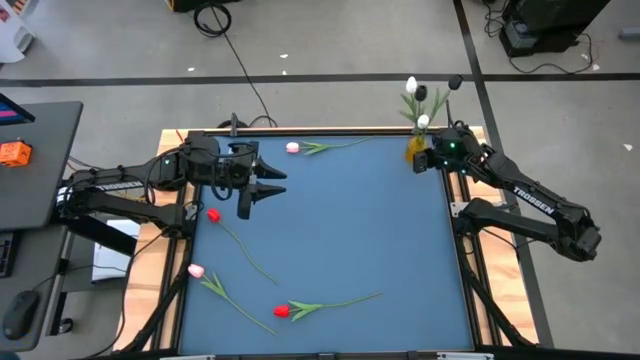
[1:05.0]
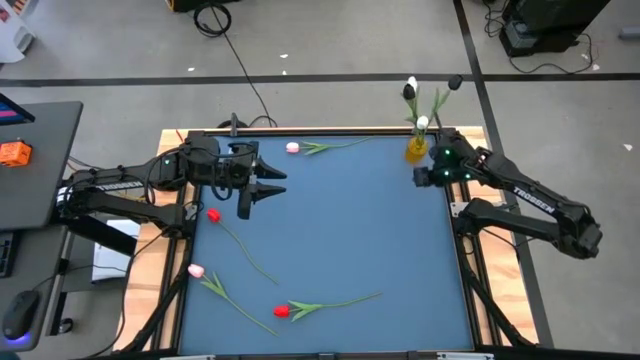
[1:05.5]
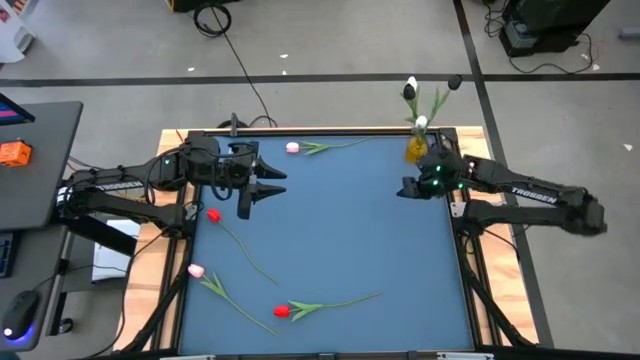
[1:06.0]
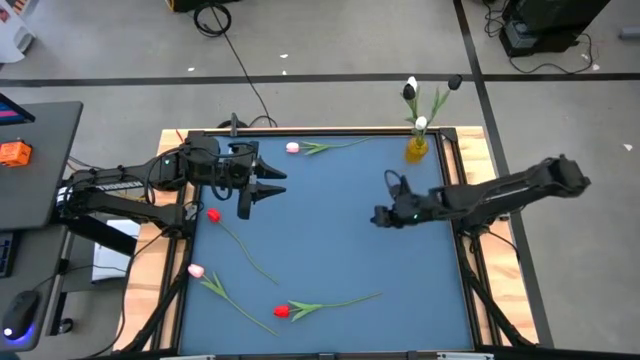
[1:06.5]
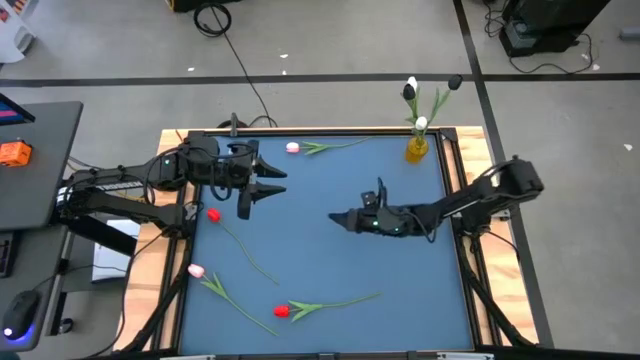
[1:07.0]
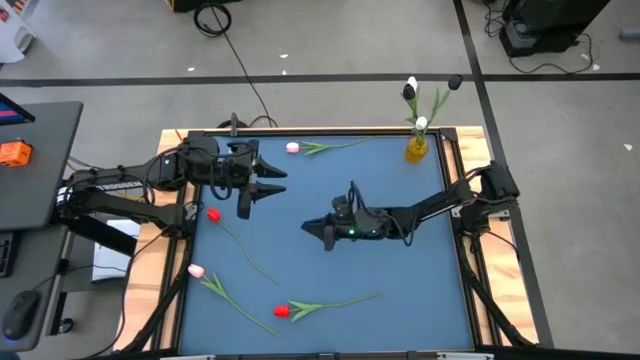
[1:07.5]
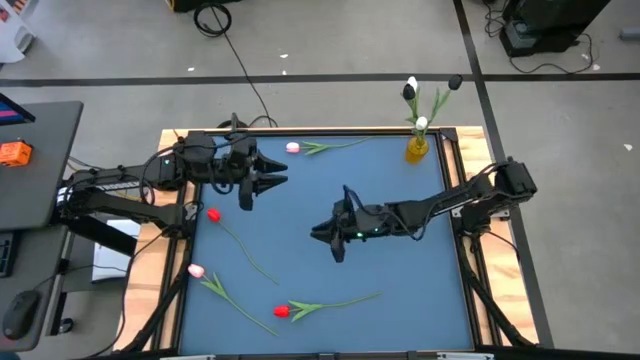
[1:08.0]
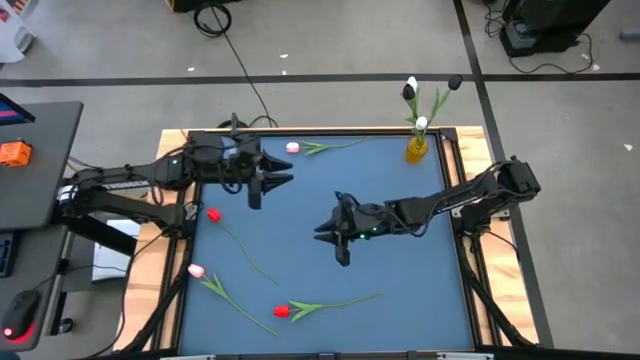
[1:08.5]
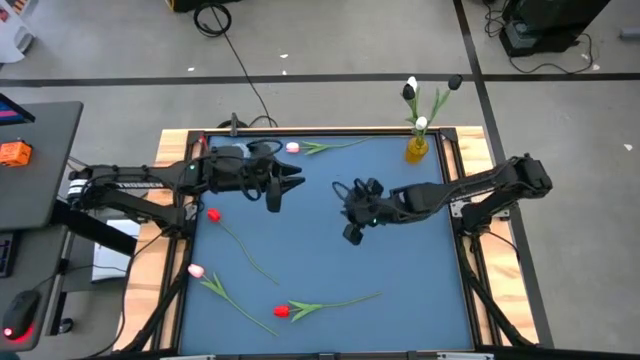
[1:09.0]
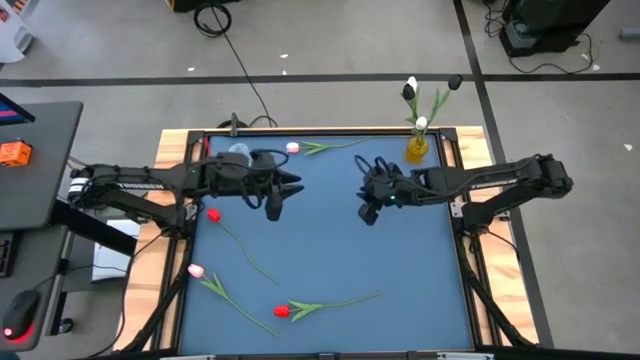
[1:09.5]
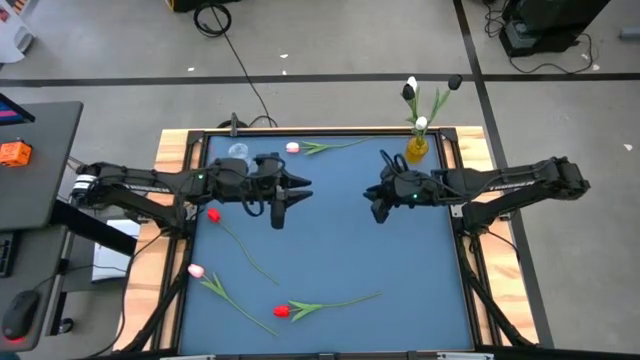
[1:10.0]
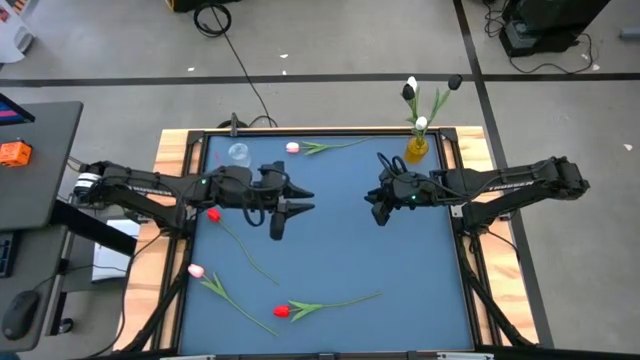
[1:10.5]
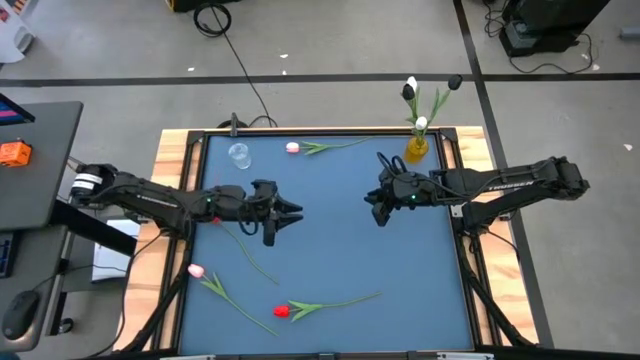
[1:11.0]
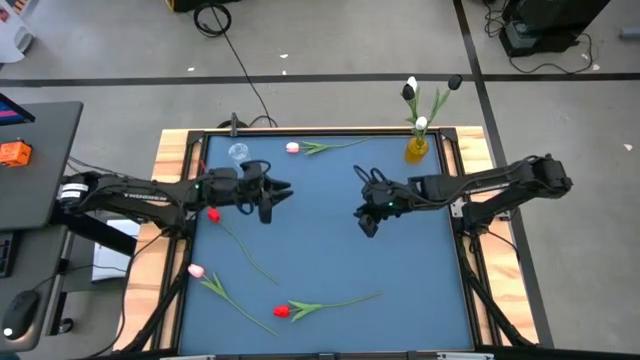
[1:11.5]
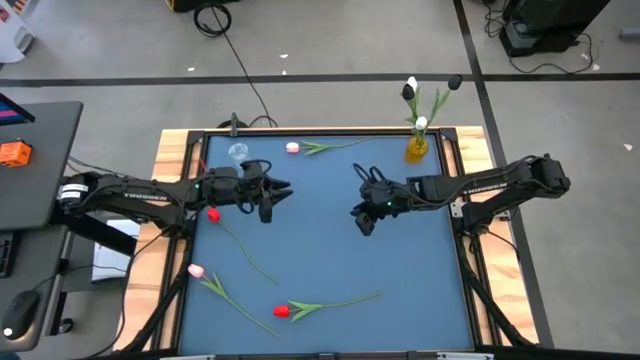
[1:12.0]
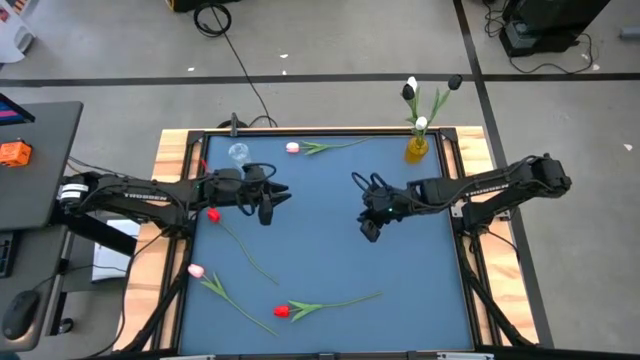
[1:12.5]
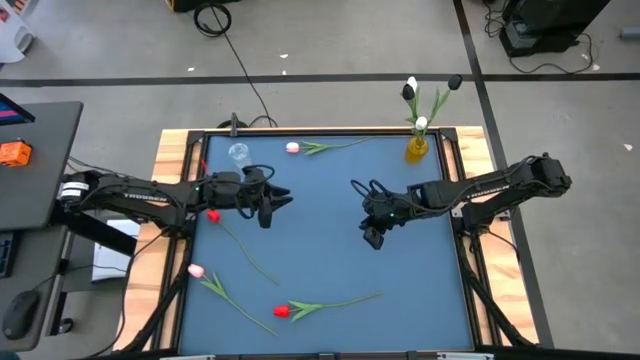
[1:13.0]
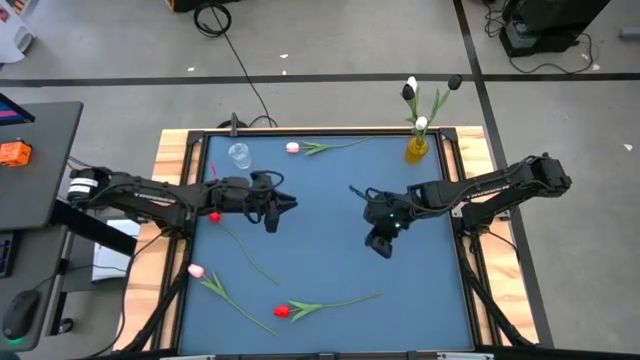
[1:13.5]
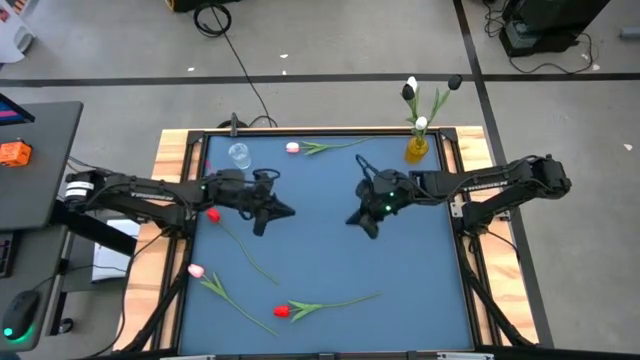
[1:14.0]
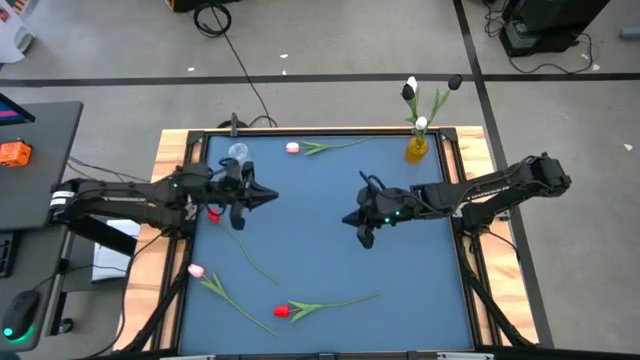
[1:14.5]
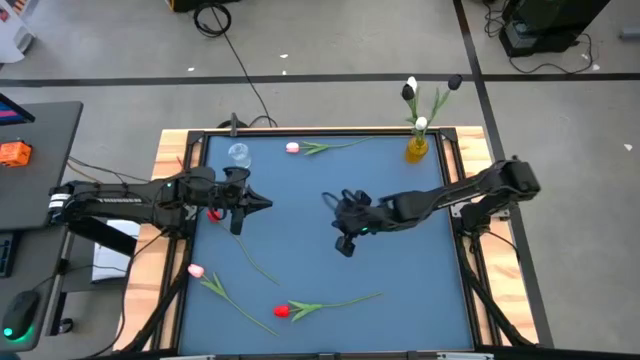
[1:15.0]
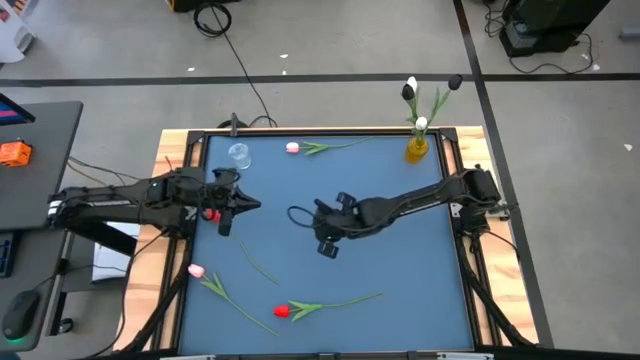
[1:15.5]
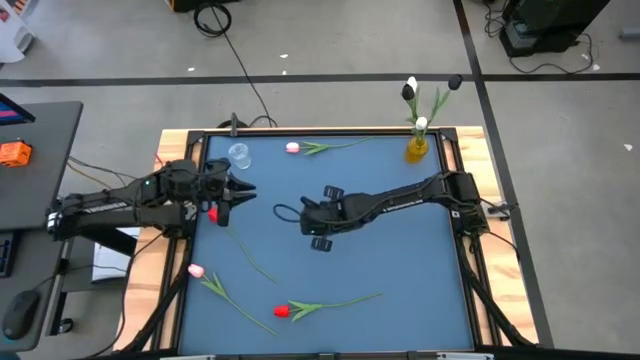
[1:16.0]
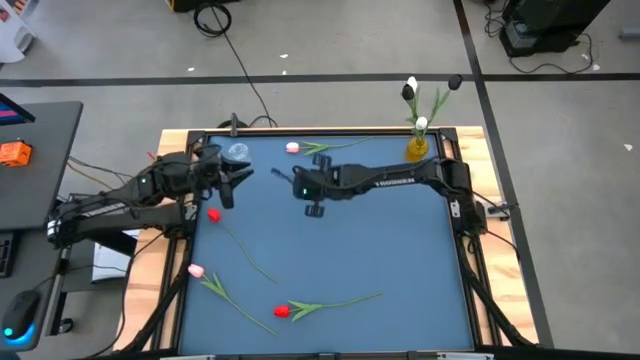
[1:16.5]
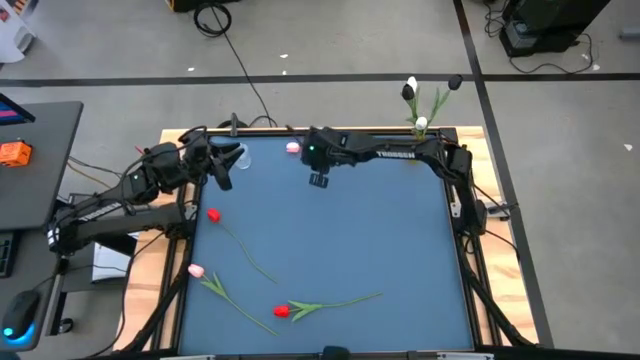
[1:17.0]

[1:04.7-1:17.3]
Task: Sort flowers into vase by color
Put the top pink tulip into the transparent vase

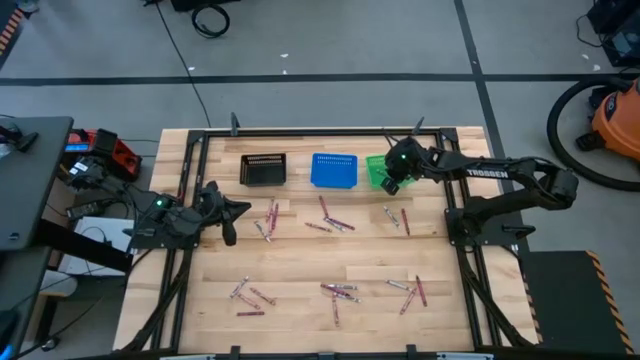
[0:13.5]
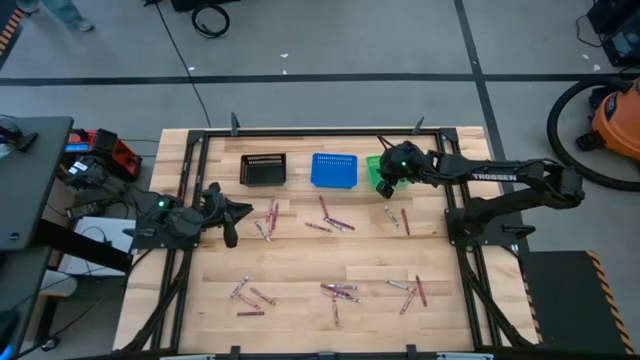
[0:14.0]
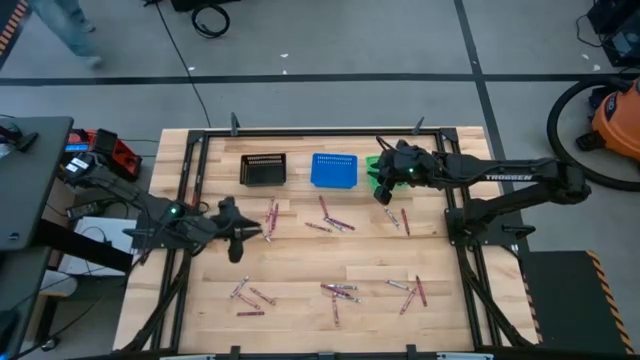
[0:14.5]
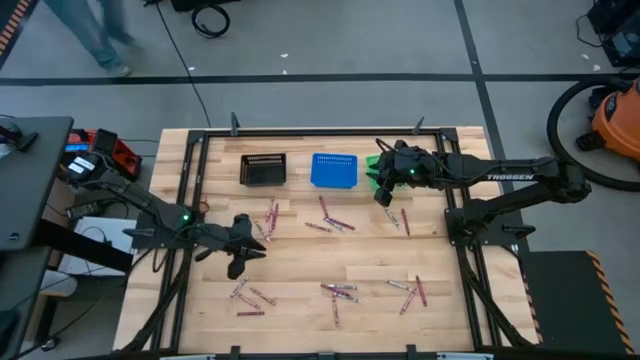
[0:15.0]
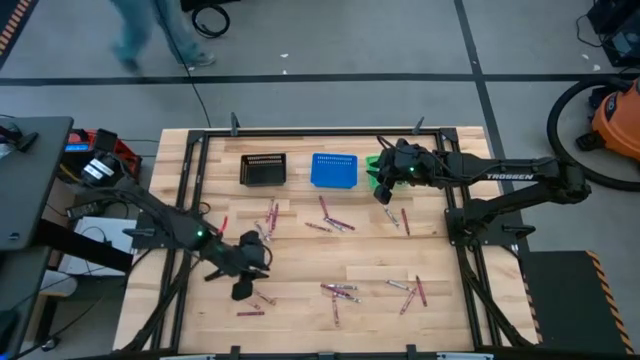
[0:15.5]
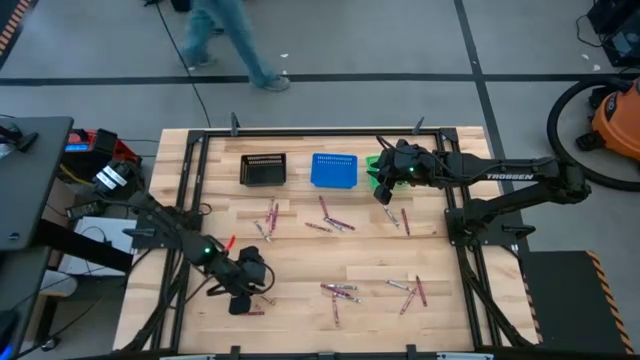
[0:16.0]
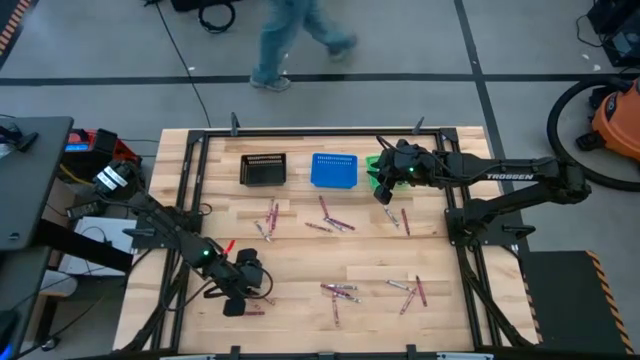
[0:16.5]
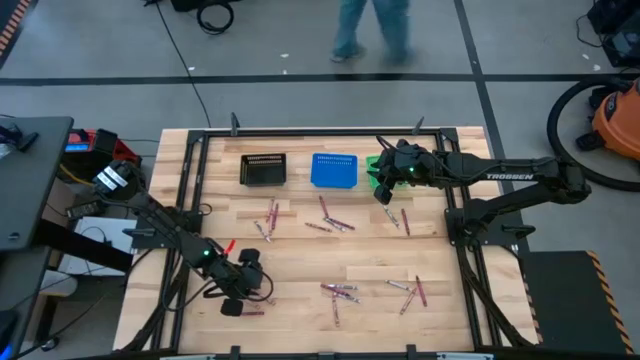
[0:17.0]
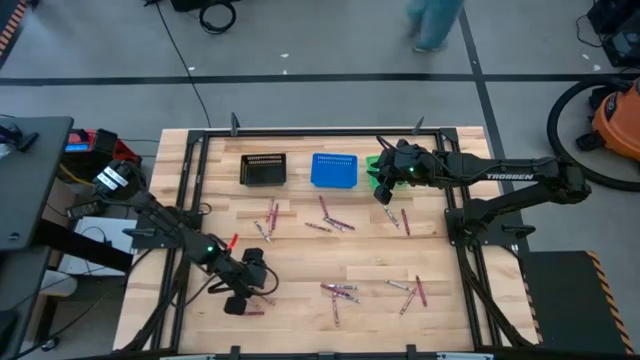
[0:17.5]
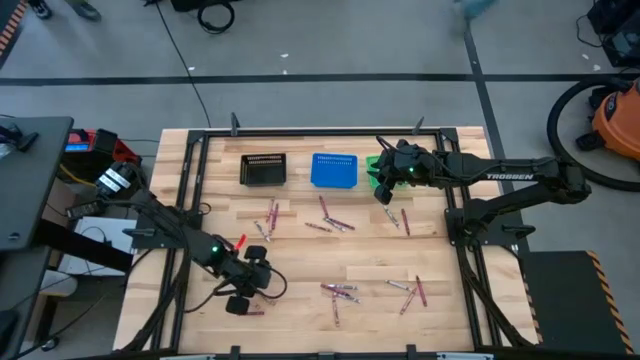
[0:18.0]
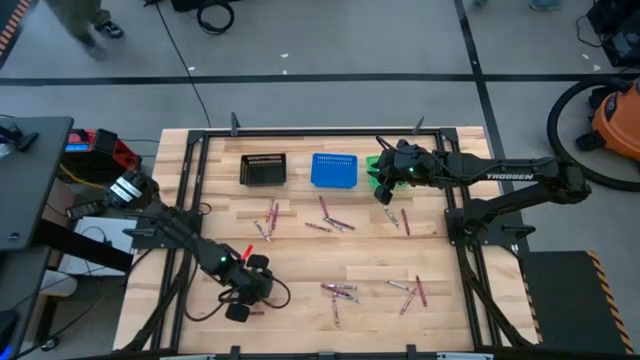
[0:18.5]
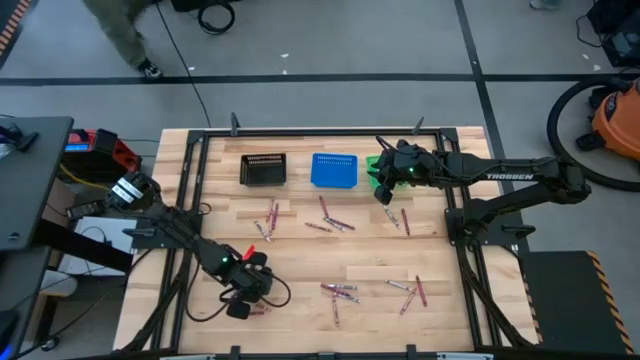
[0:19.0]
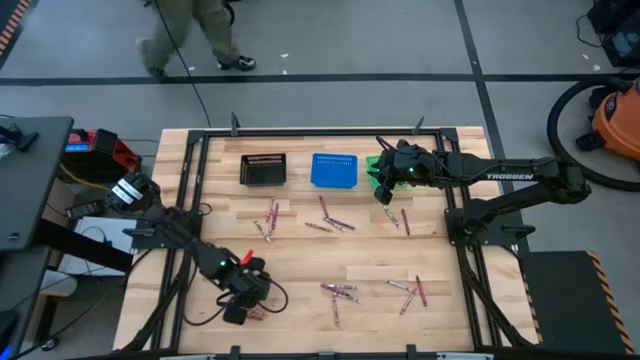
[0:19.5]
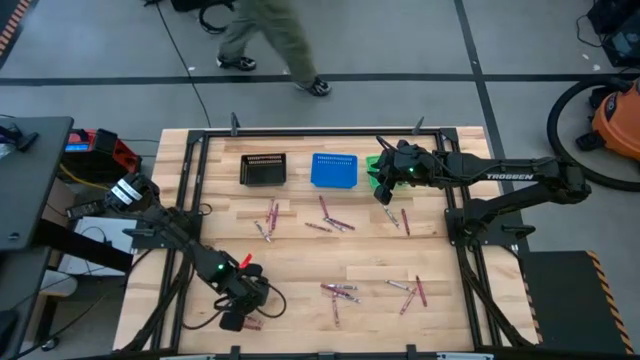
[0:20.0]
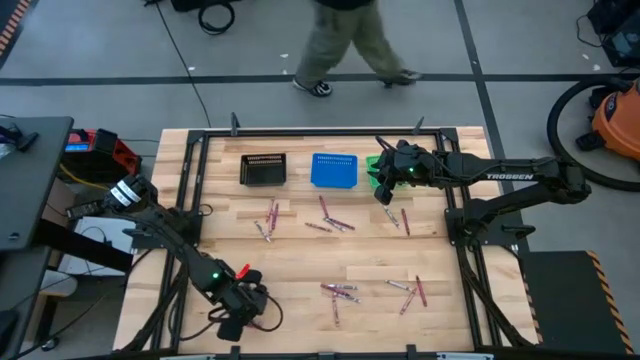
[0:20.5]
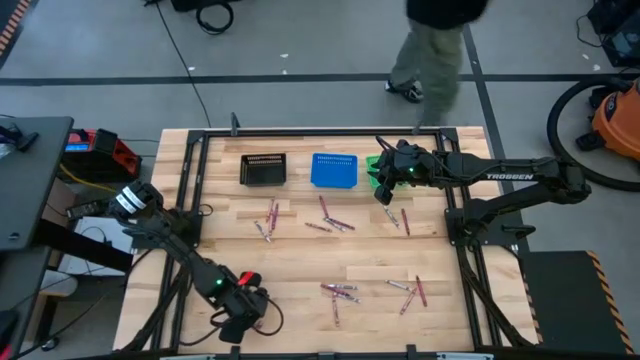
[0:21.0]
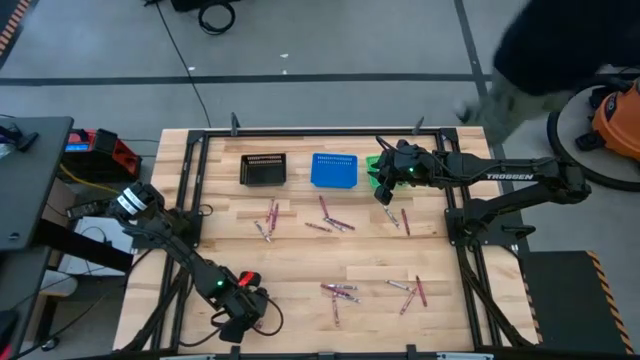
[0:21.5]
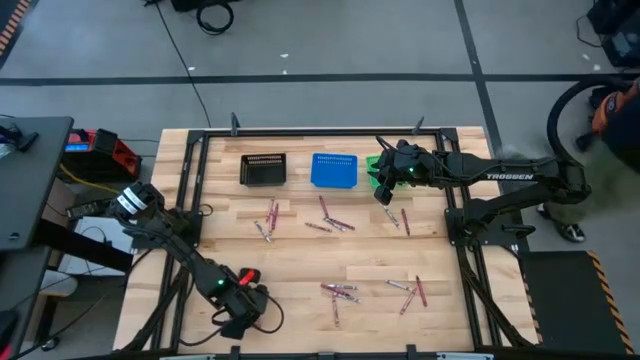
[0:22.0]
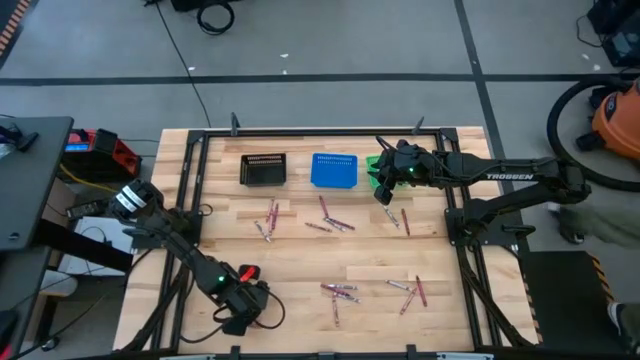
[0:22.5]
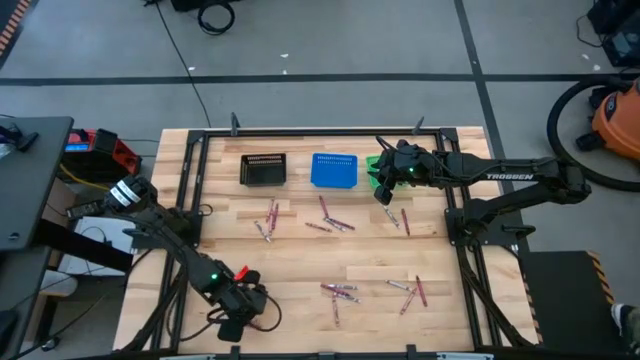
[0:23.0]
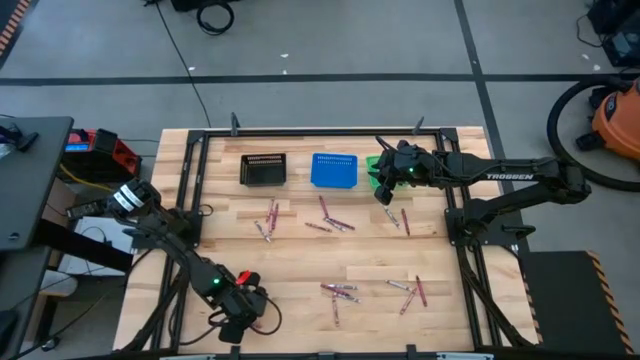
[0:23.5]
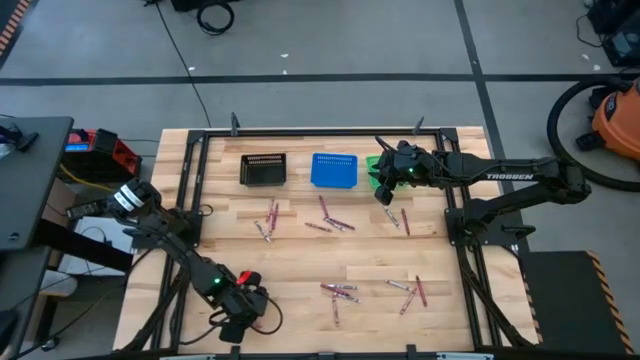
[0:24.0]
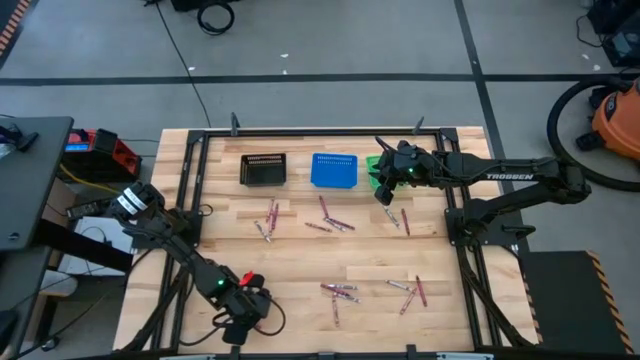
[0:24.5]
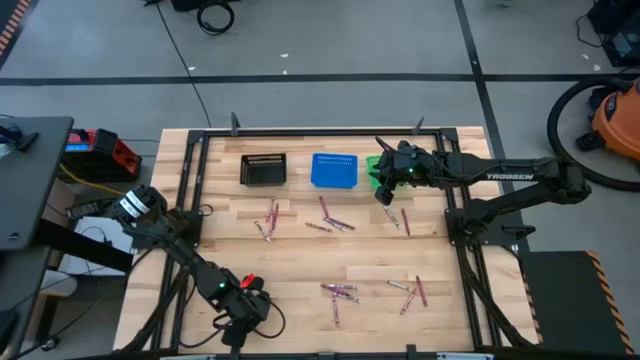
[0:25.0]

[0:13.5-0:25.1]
Task: Sort crayons
Put the pink crayon into the black bin
